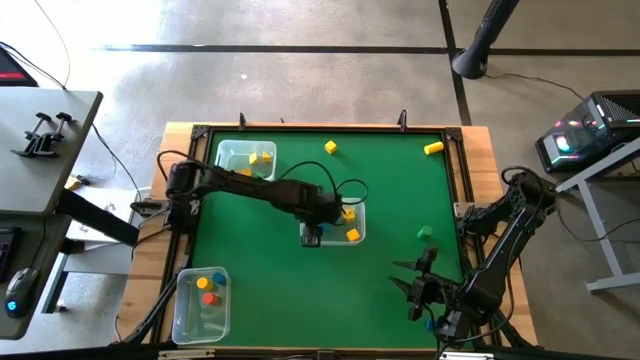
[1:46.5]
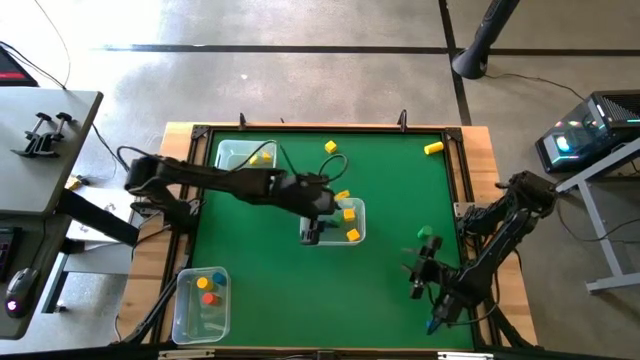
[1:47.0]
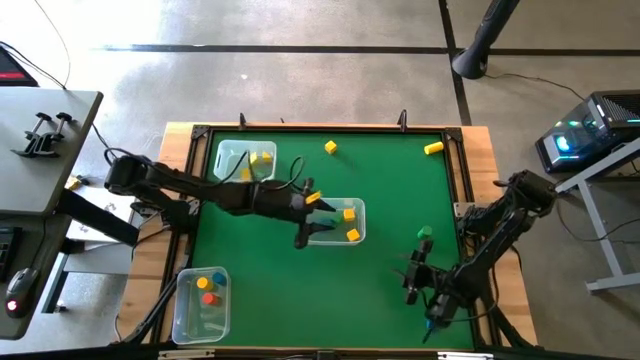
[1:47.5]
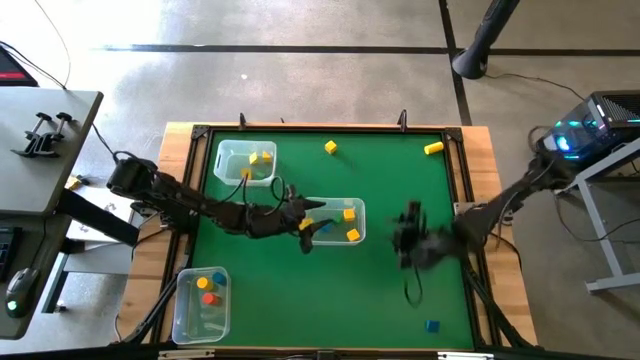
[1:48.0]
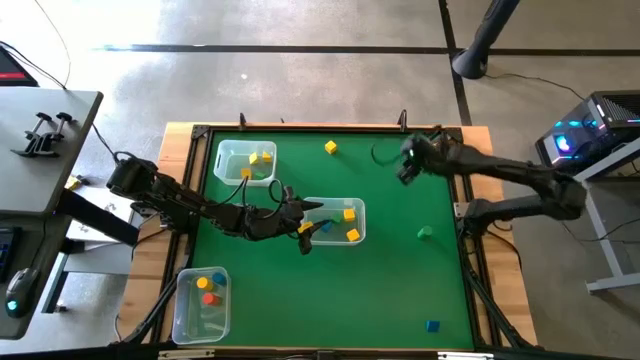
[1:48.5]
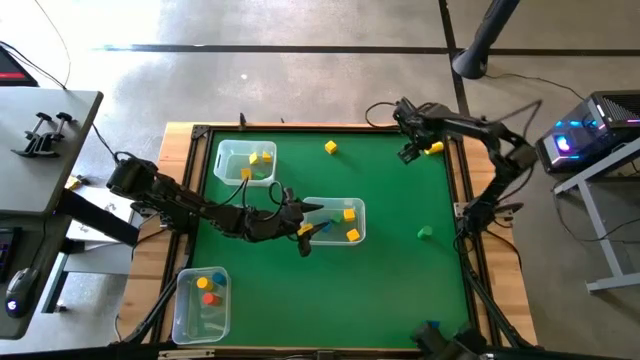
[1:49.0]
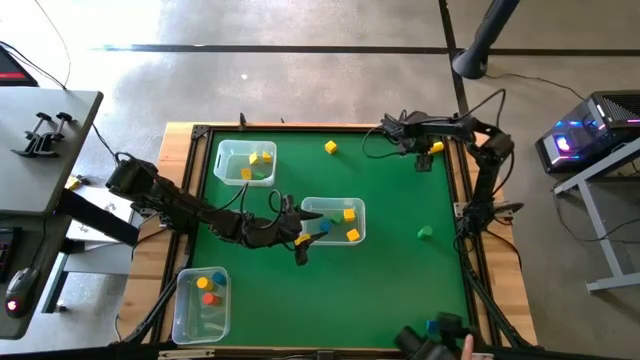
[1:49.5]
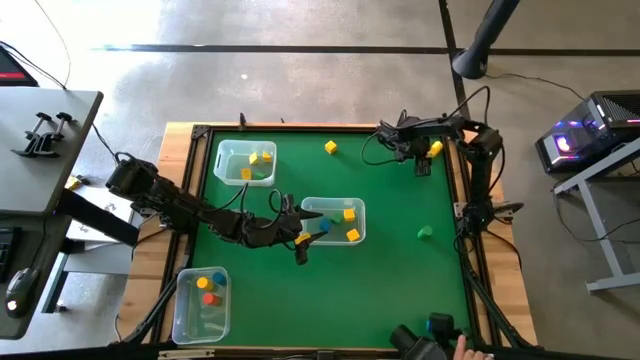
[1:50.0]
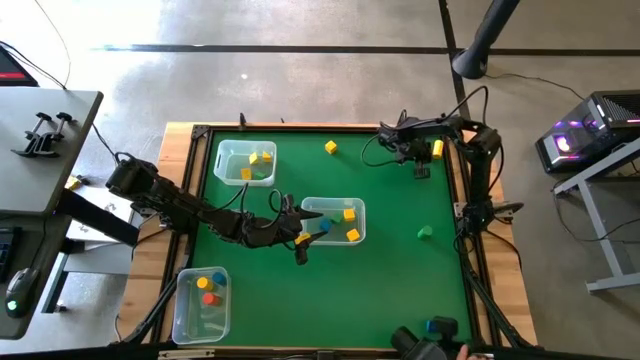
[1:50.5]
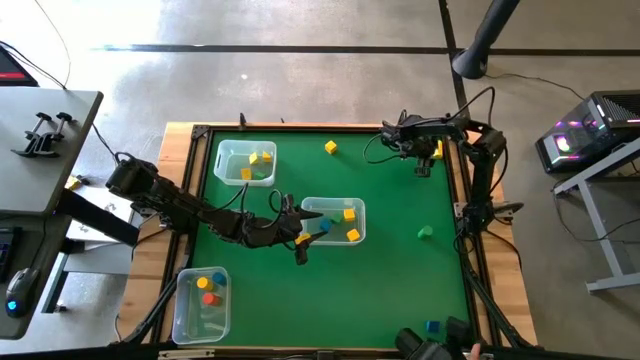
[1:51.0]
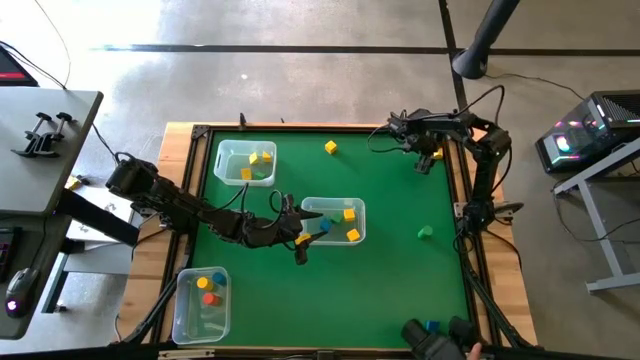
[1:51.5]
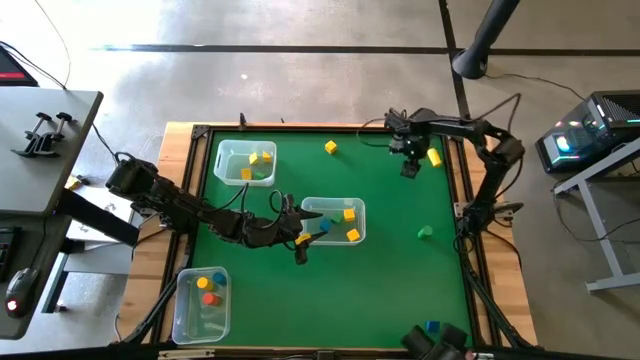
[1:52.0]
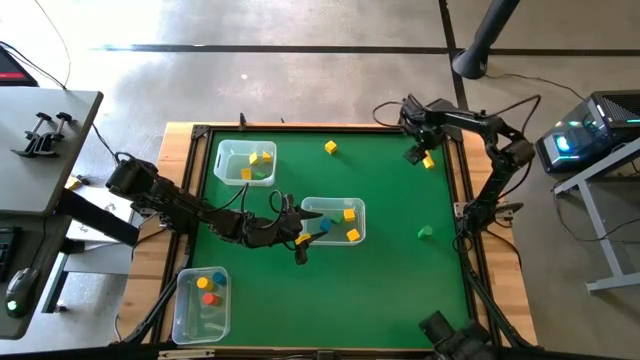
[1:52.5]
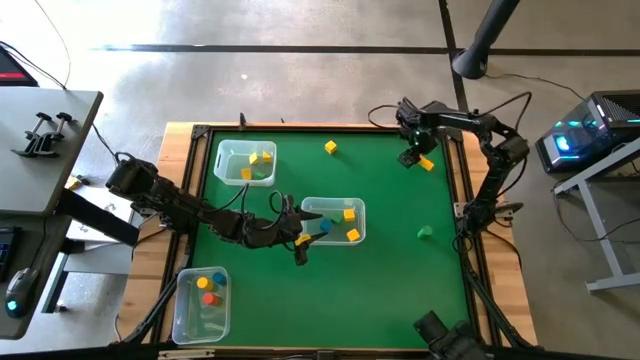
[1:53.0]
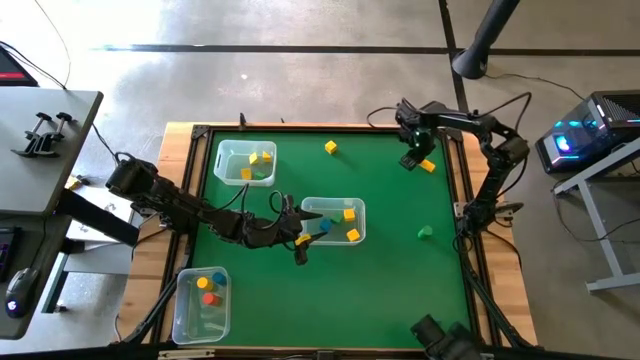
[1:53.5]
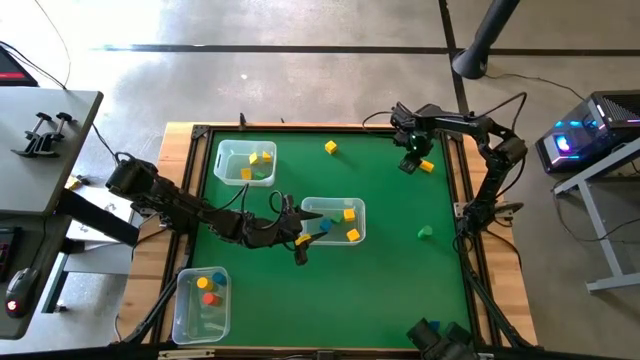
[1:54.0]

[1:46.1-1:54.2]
Task: Sort blocks by size
Put the yellow cylindrical block into the bottom left transparent bin

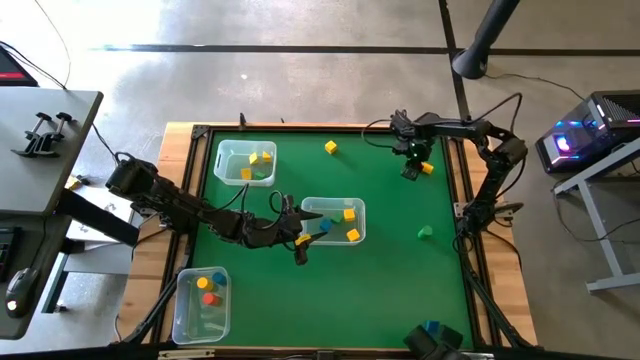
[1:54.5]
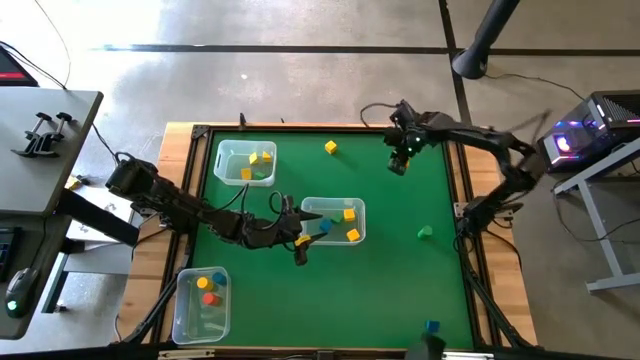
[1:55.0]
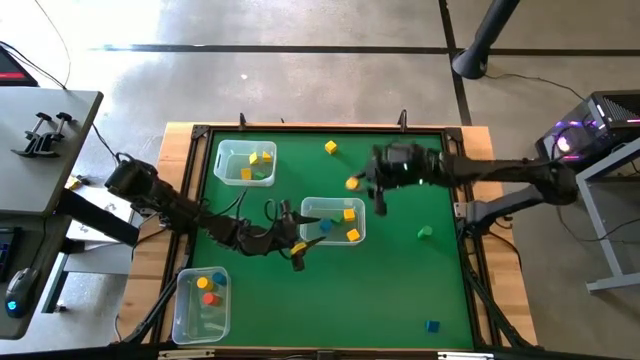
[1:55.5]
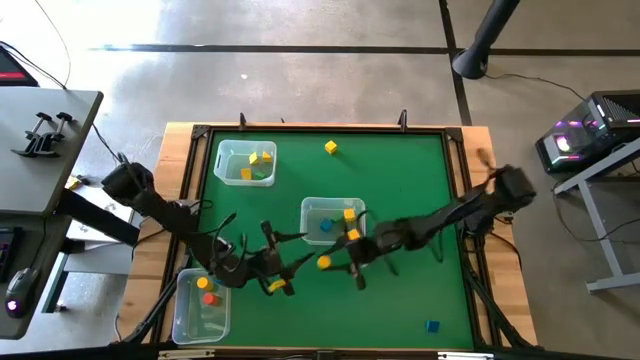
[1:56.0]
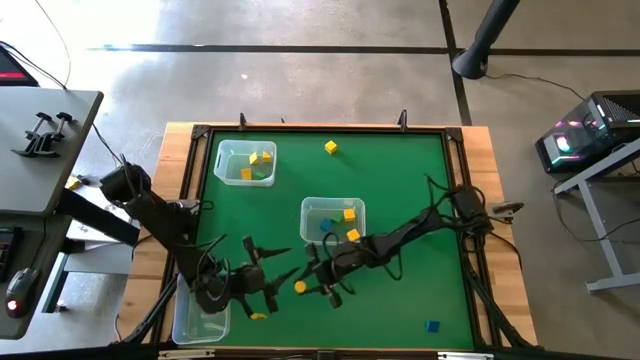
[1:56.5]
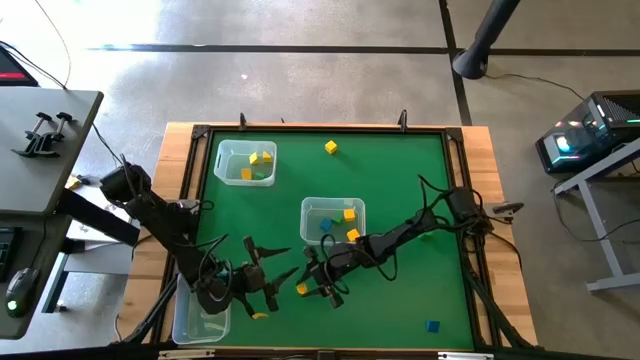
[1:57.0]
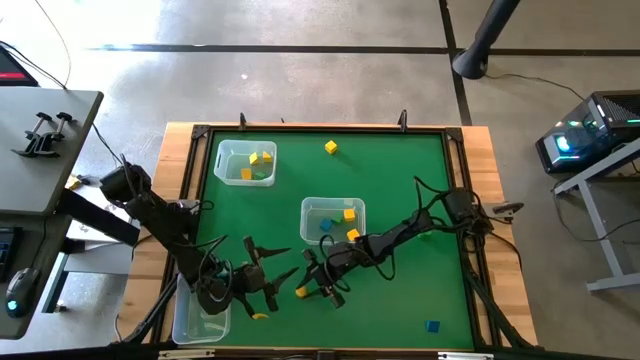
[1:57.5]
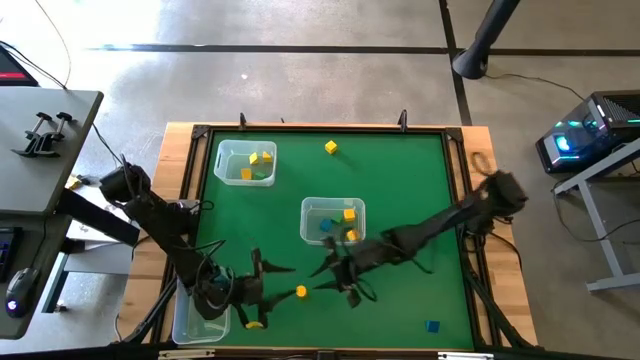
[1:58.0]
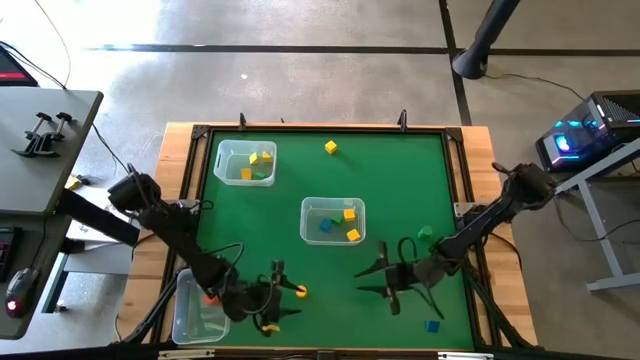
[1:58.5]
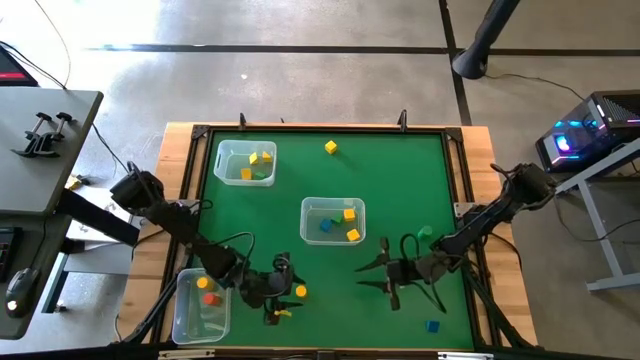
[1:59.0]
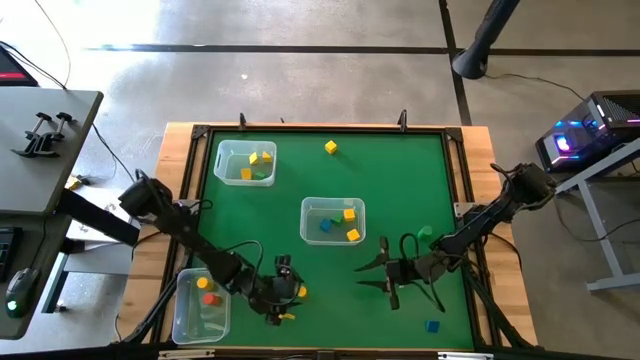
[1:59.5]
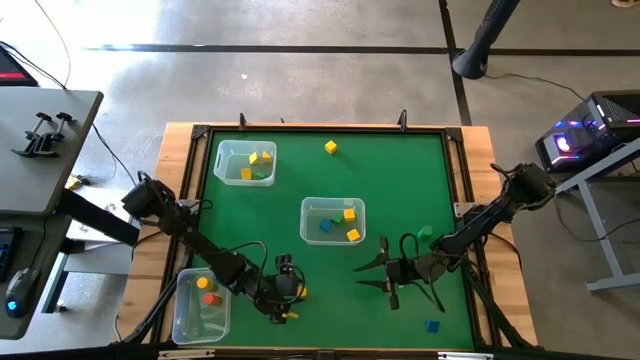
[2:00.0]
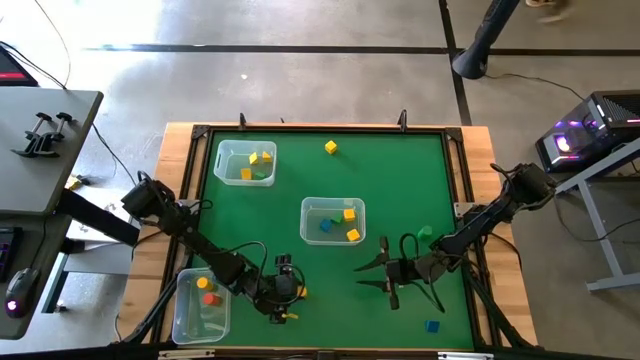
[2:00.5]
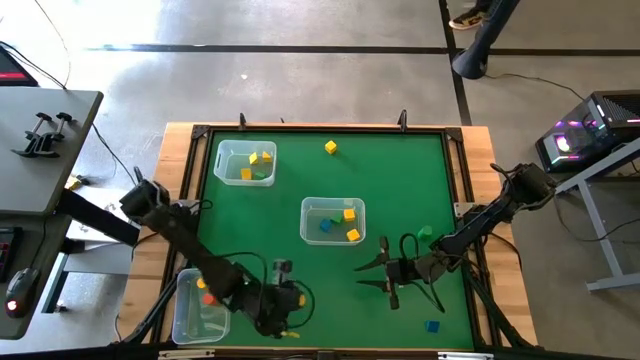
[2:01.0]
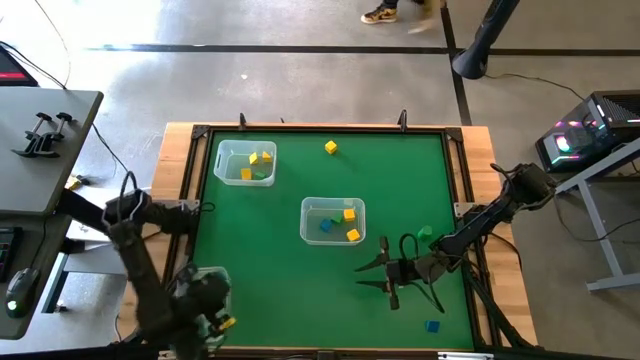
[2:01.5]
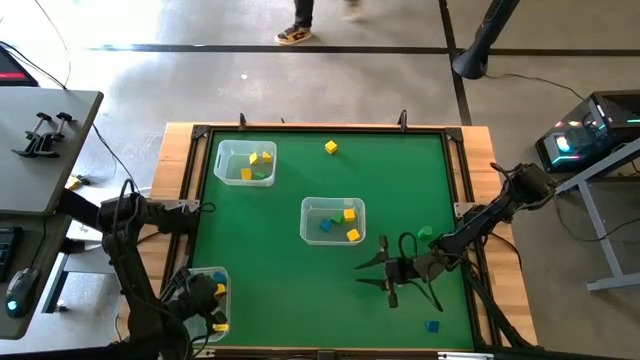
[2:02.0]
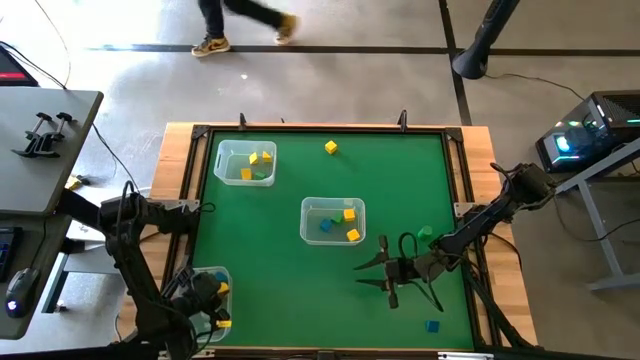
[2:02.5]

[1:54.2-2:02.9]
Put the yellow cylindrical block into the bottom left transparent bin

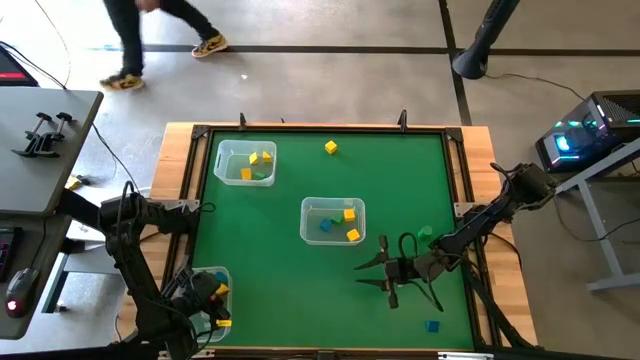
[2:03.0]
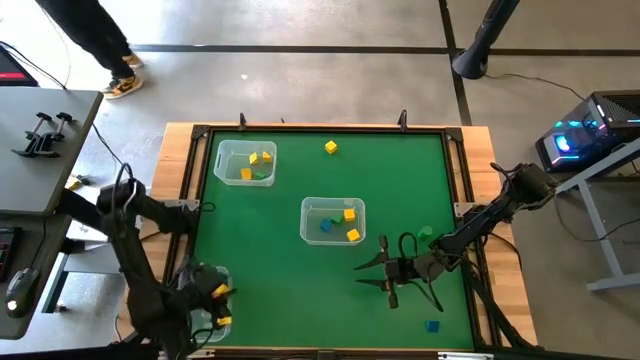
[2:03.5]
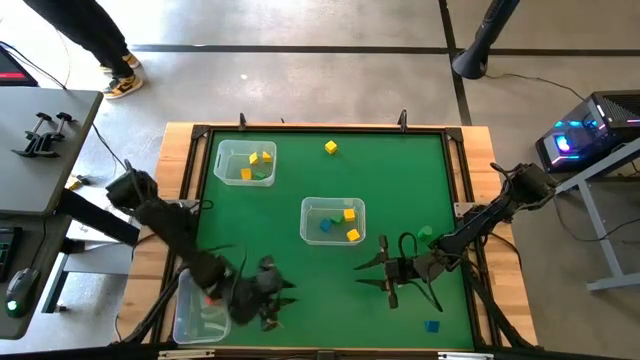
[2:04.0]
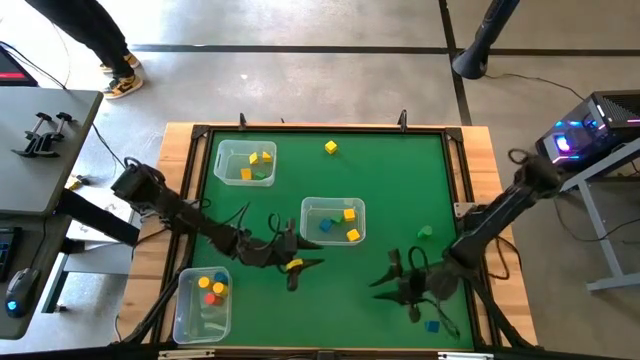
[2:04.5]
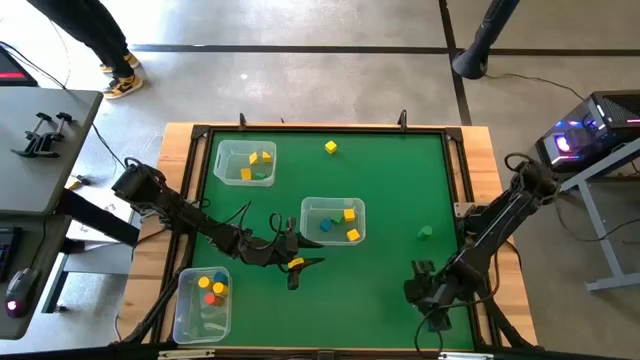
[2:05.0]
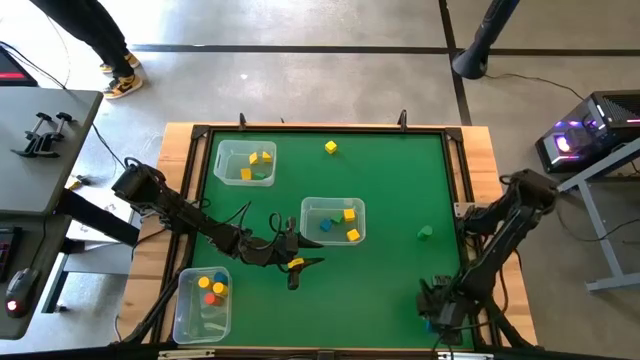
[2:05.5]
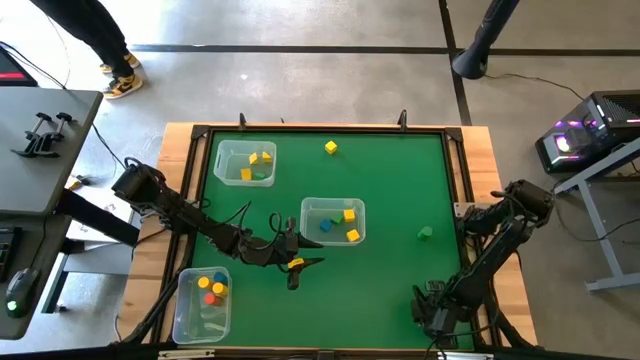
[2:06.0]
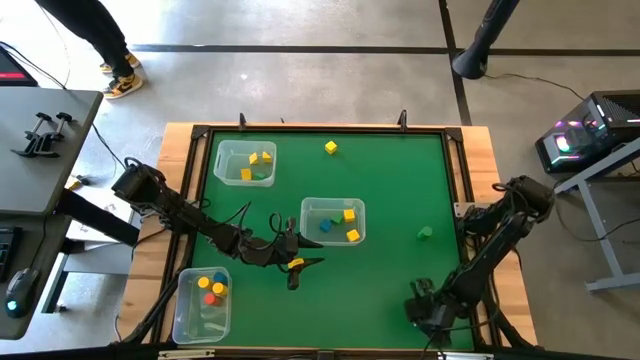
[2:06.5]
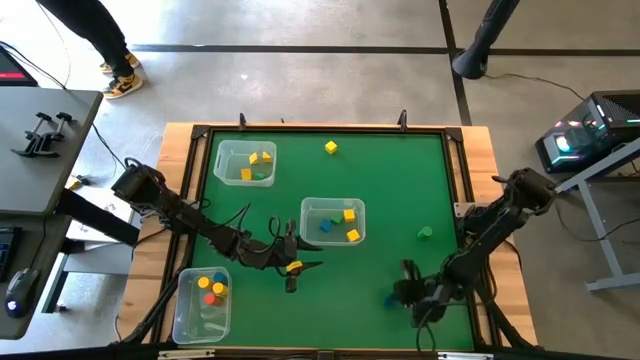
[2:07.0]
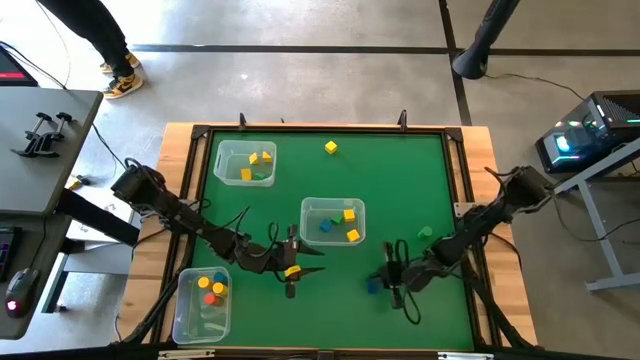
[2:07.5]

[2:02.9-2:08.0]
Put the blue triangular block into the top left transparent bin
